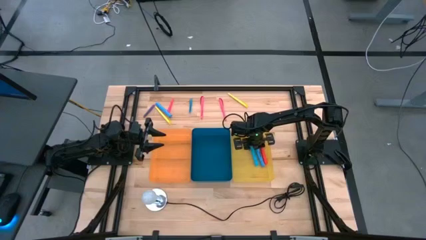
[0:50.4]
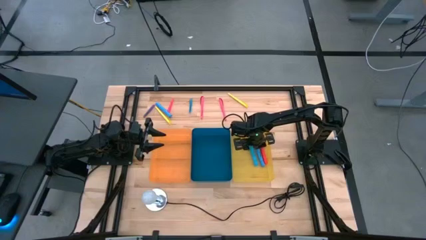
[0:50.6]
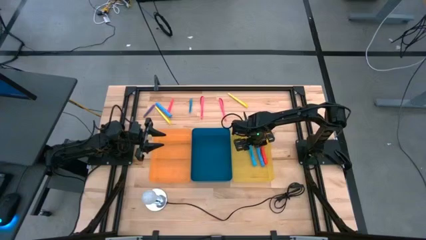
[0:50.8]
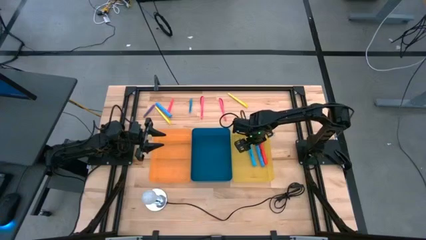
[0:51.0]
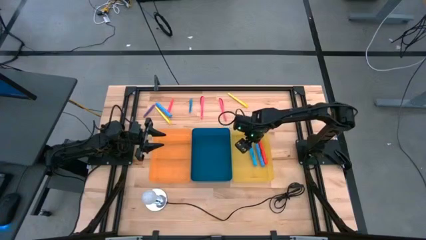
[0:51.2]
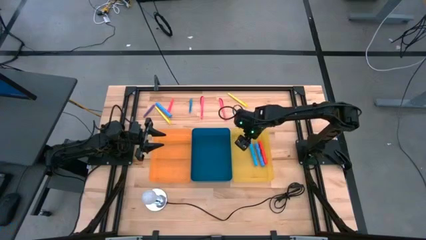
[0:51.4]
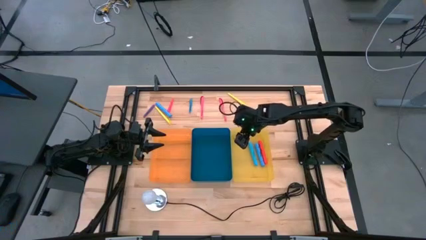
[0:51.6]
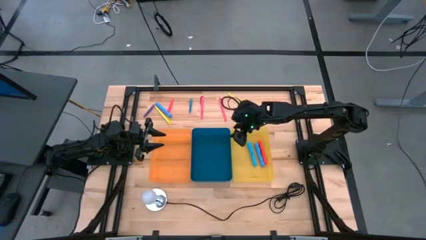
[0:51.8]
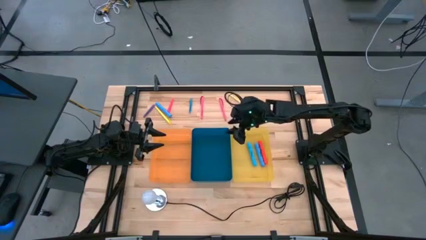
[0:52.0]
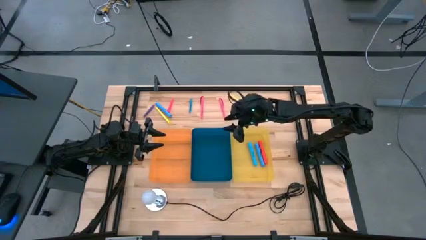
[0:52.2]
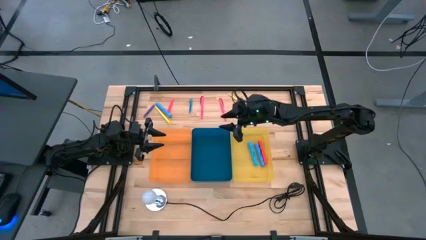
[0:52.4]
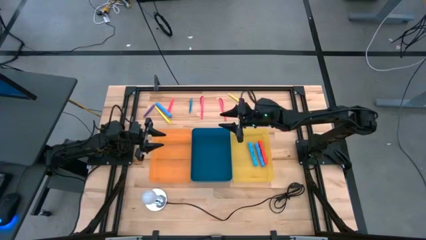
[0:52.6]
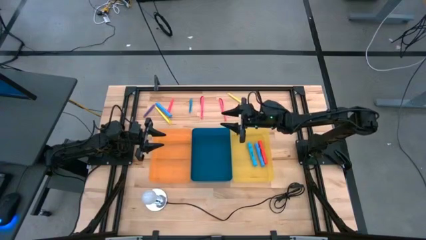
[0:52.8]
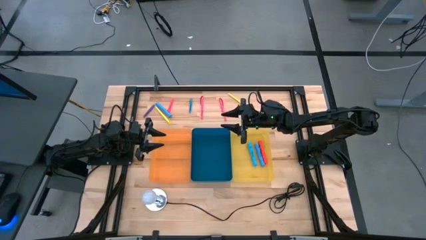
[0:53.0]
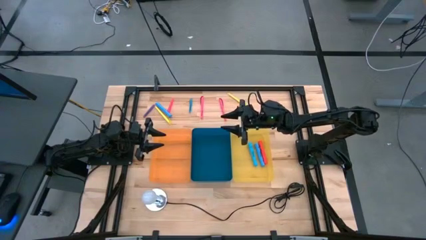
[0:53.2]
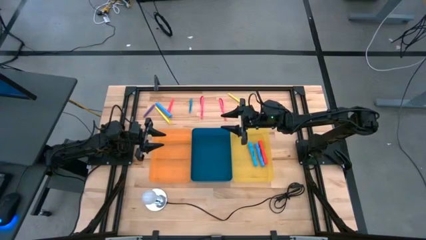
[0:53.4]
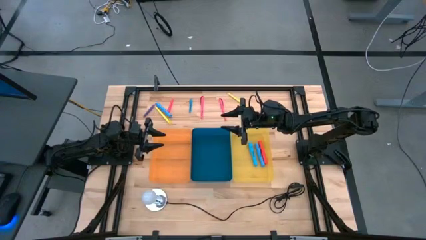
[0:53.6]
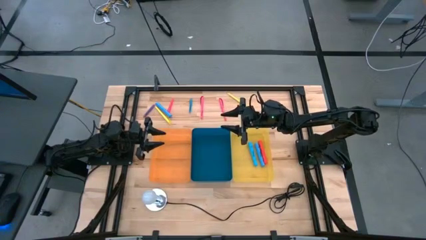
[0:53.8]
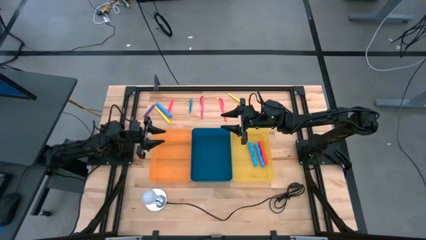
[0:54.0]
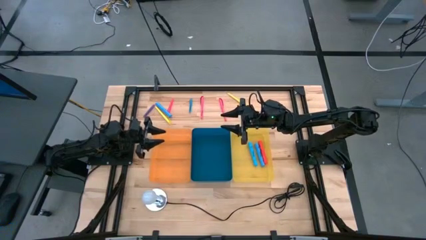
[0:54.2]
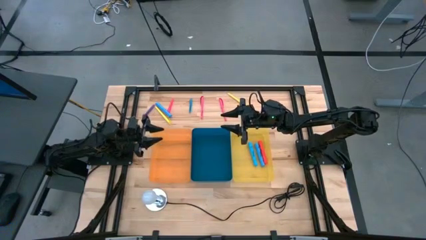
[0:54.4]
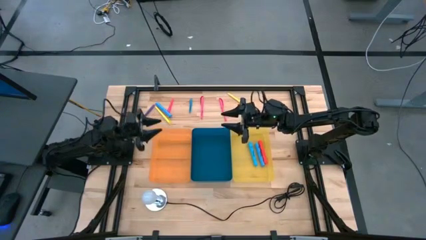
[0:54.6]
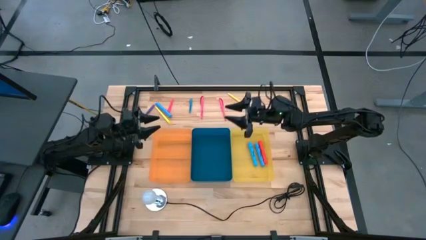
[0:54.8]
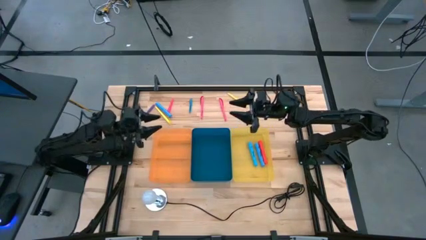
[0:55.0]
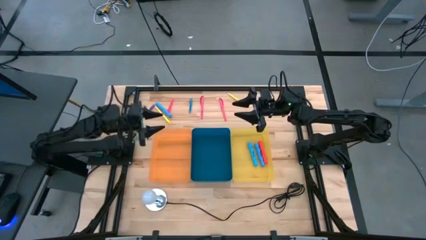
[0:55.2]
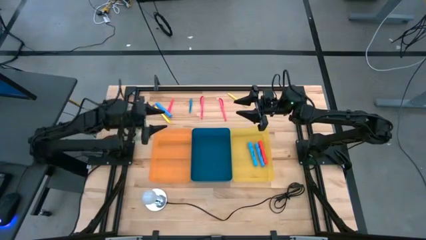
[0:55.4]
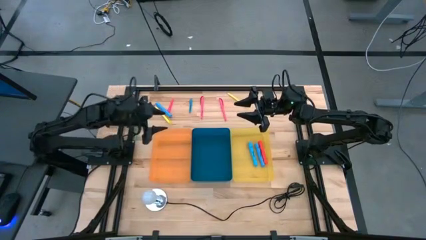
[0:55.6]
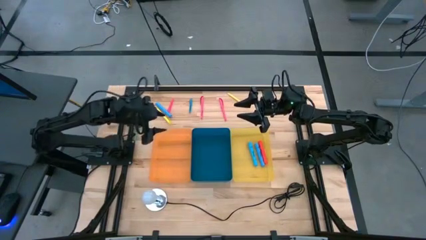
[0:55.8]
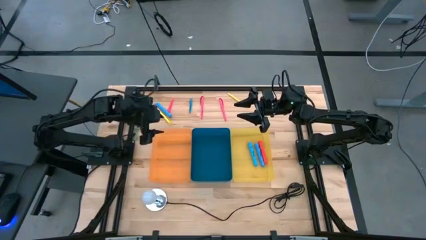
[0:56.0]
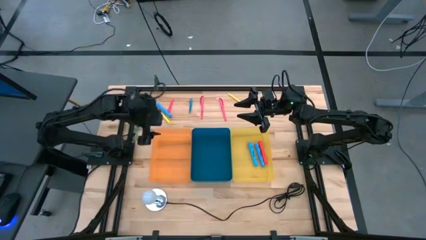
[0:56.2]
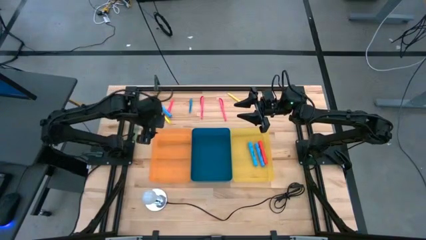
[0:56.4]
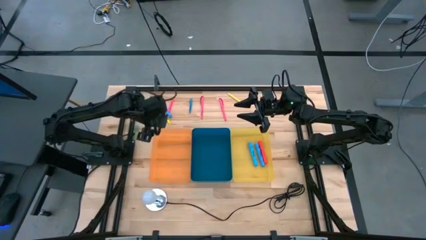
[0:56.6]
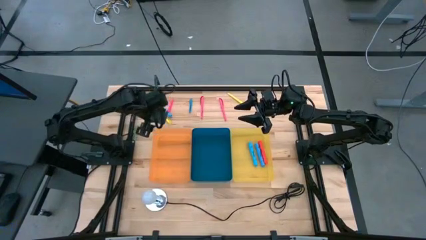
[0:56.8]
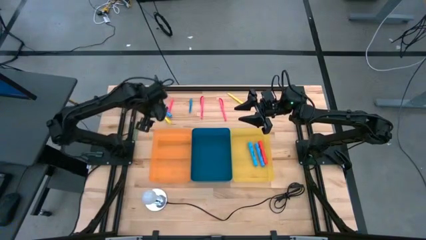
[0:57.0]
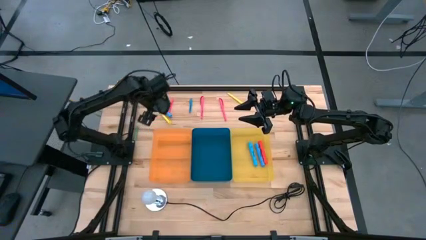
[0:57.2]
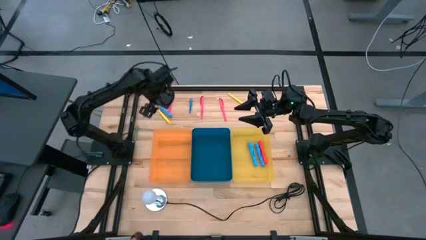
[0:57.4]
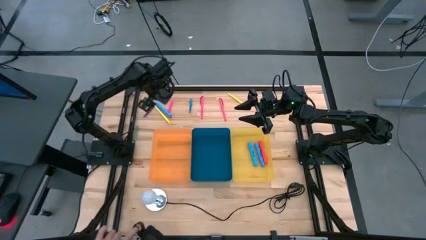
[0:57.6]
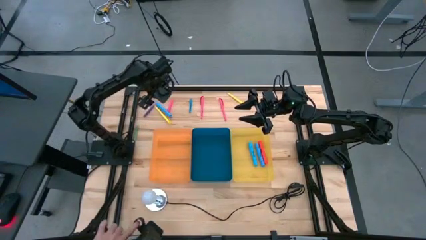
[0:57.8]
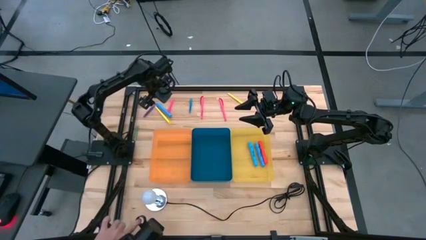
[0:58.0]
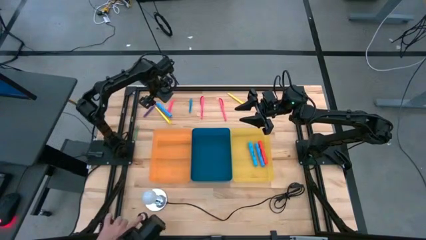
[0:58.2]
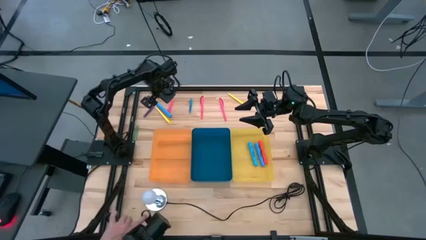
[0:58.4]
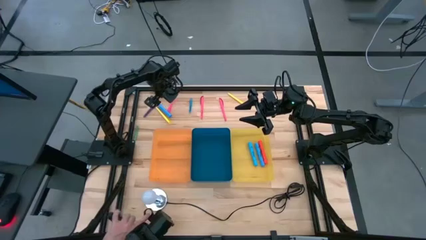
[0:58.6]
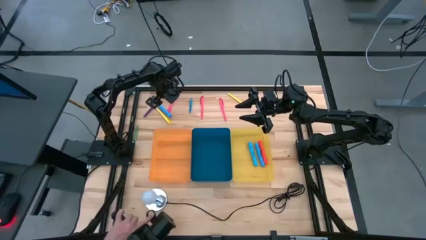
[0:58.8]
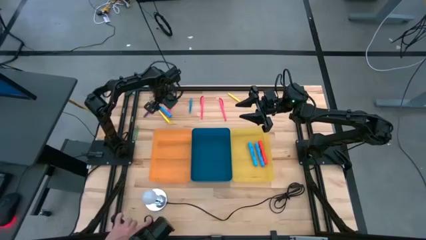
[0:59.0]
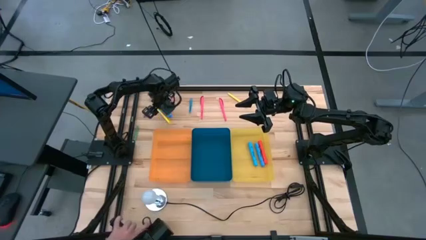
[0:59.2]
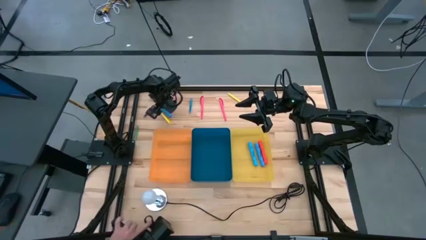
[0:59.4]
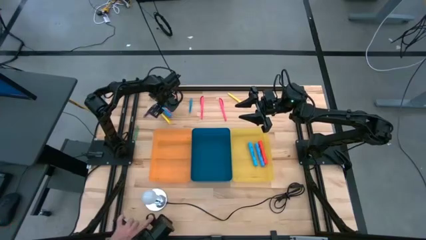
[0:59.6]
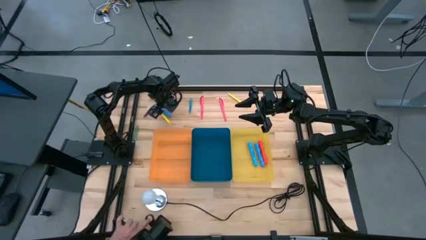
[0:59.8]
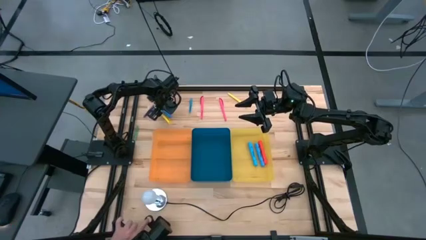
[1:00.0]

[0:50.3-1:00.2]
Task: Pick & Place Markers
Put the blue marker into the yellow bin
